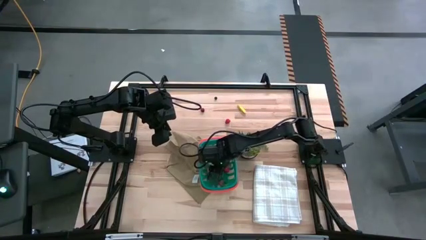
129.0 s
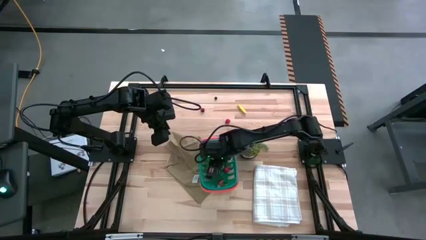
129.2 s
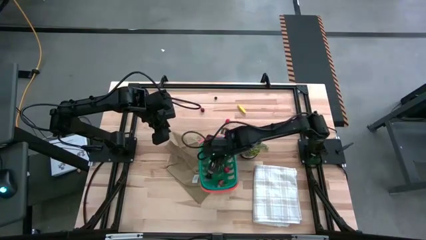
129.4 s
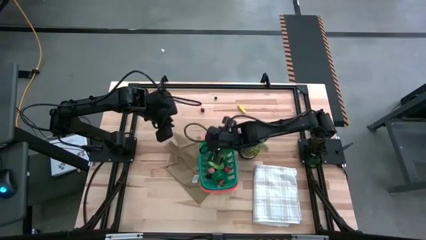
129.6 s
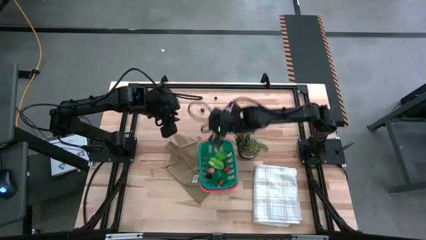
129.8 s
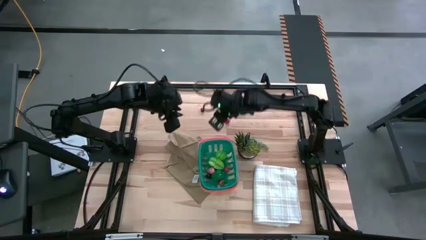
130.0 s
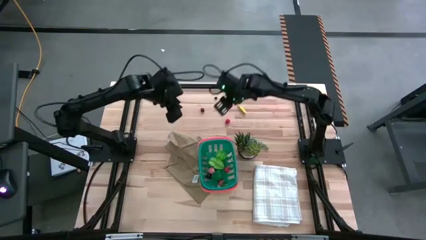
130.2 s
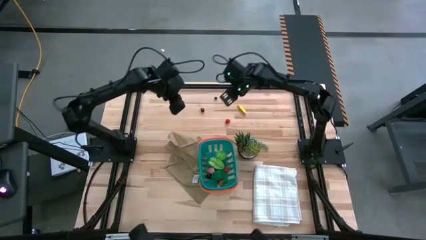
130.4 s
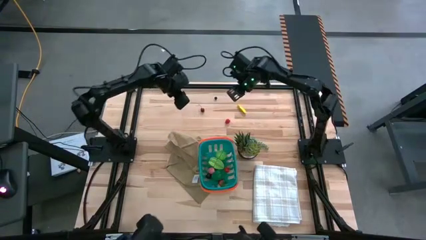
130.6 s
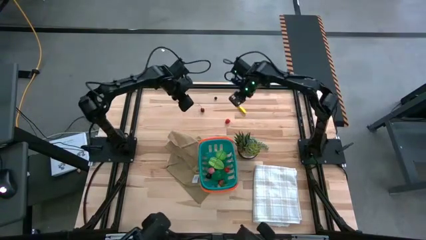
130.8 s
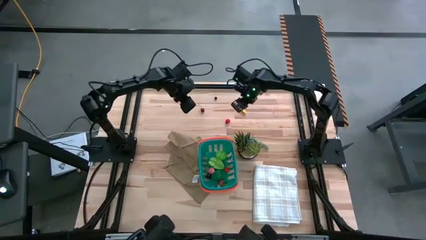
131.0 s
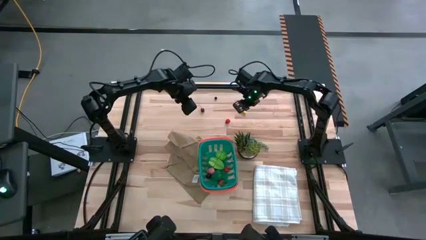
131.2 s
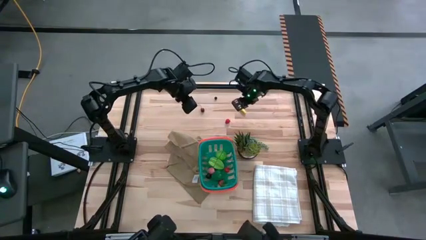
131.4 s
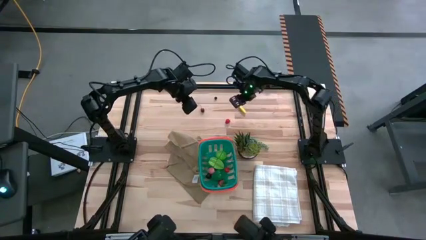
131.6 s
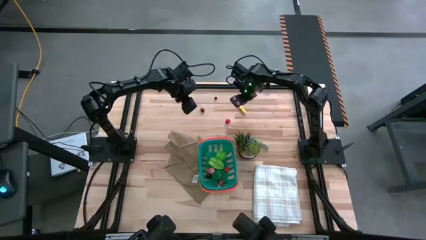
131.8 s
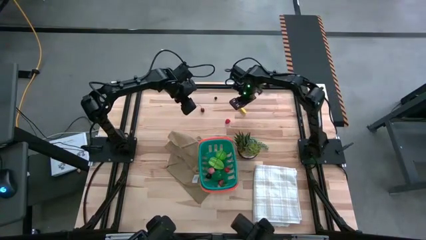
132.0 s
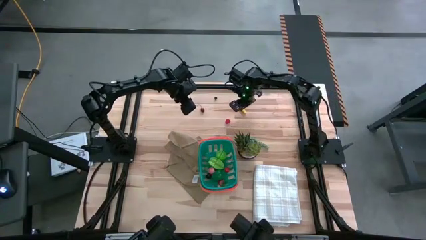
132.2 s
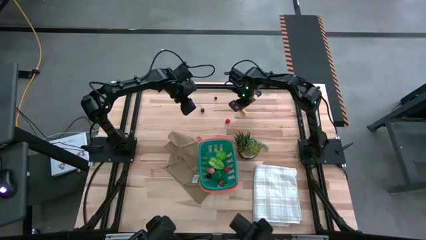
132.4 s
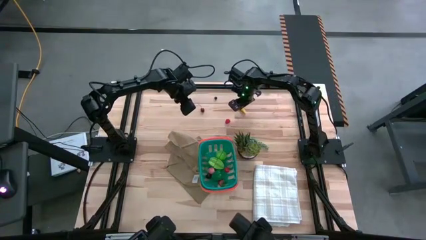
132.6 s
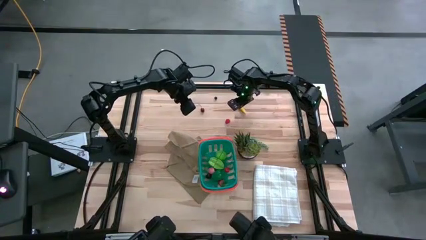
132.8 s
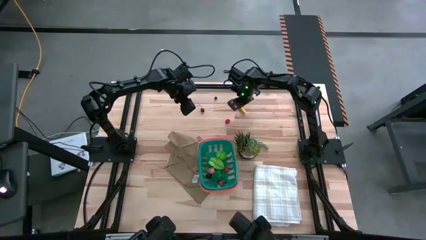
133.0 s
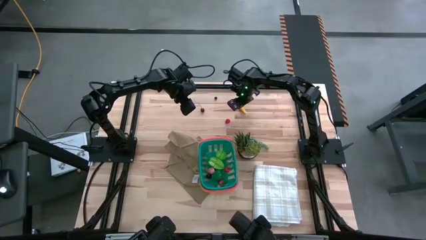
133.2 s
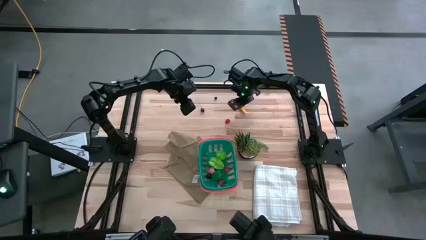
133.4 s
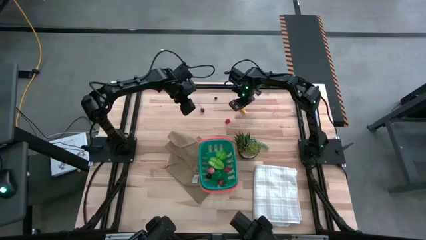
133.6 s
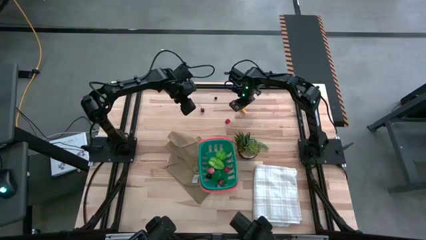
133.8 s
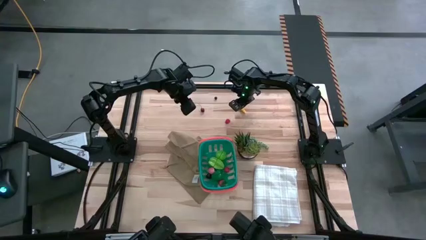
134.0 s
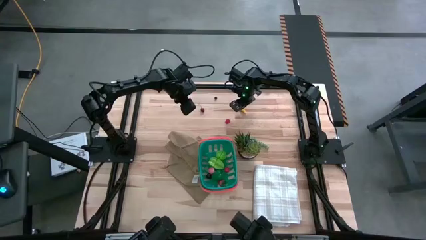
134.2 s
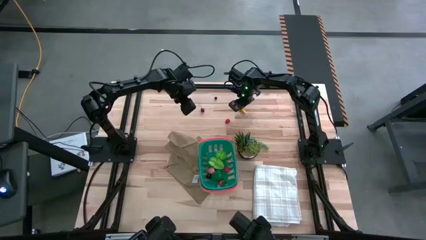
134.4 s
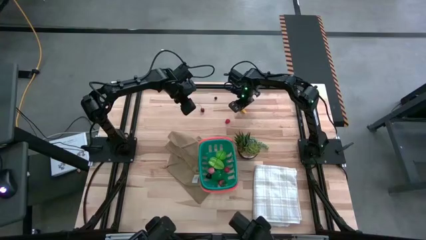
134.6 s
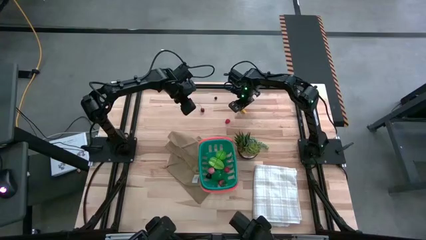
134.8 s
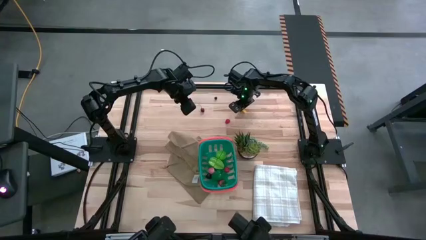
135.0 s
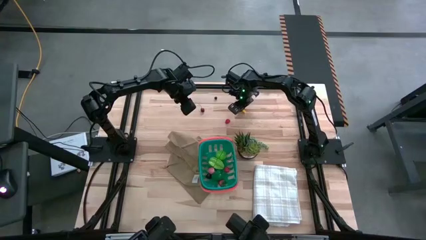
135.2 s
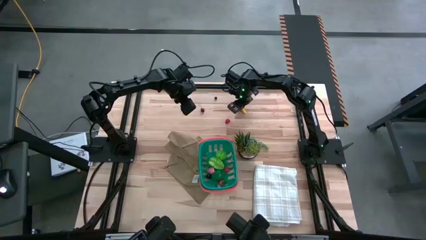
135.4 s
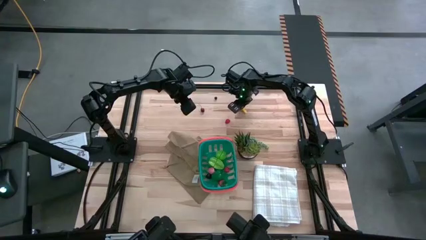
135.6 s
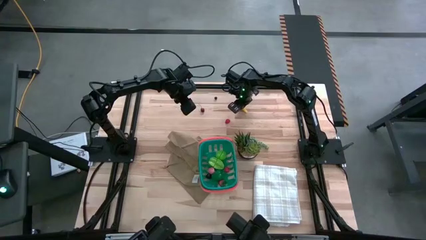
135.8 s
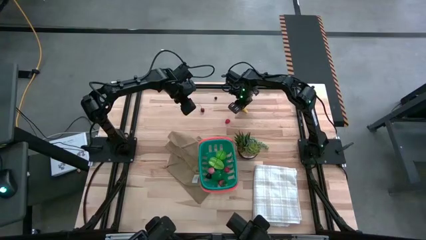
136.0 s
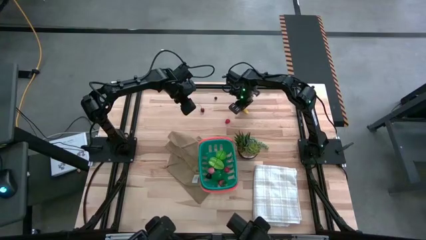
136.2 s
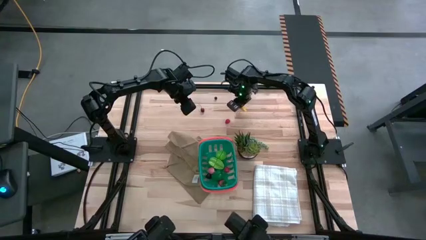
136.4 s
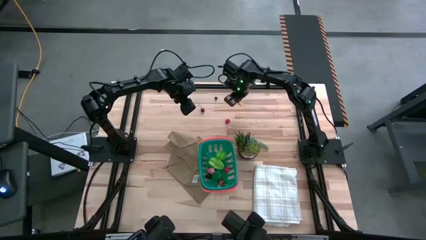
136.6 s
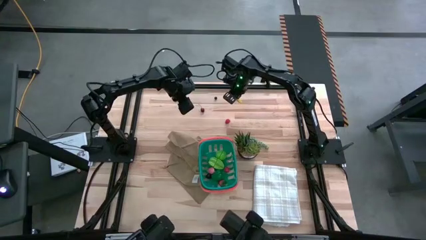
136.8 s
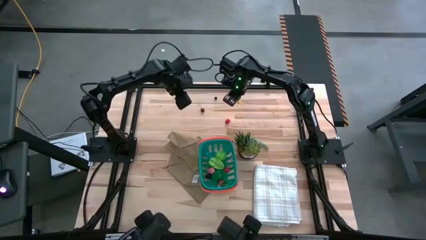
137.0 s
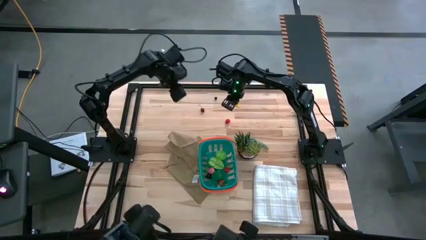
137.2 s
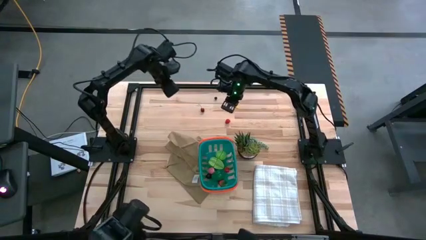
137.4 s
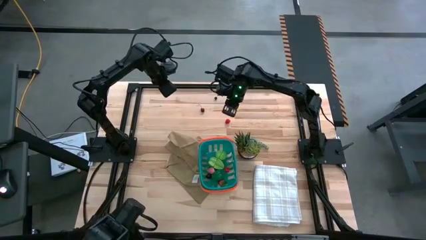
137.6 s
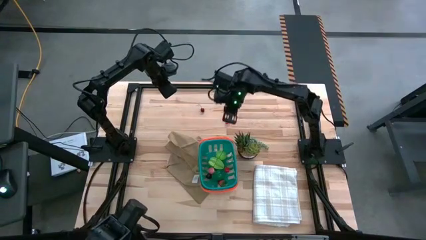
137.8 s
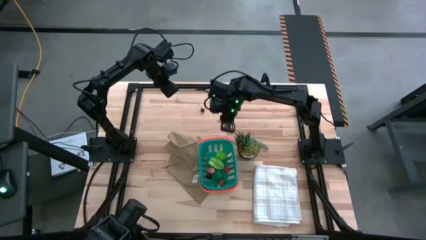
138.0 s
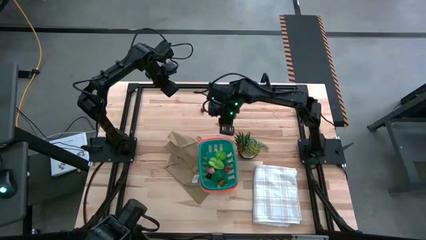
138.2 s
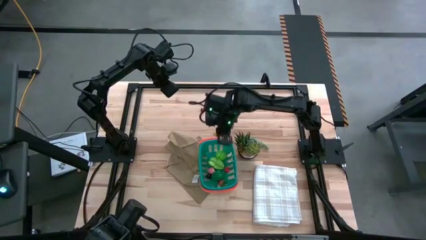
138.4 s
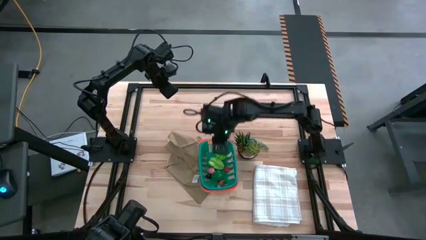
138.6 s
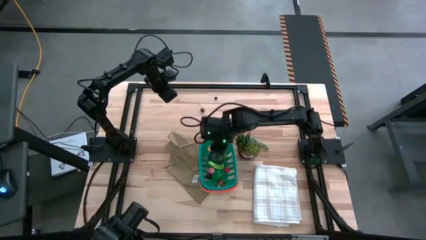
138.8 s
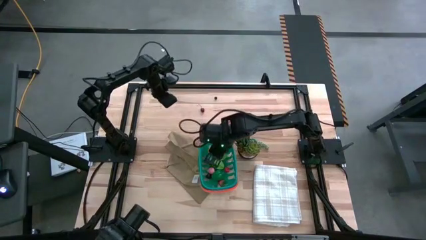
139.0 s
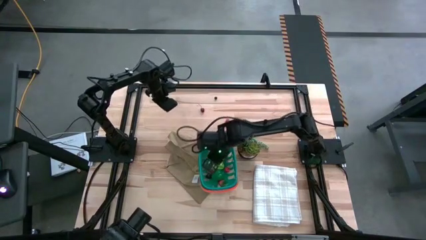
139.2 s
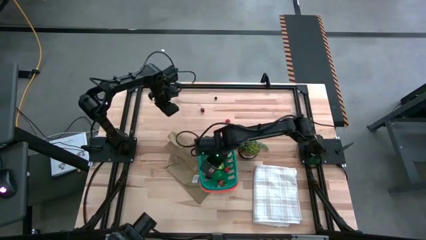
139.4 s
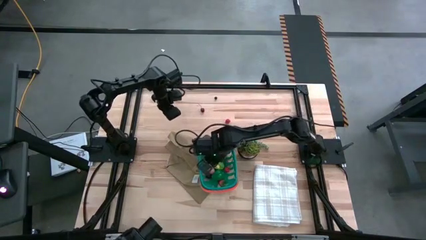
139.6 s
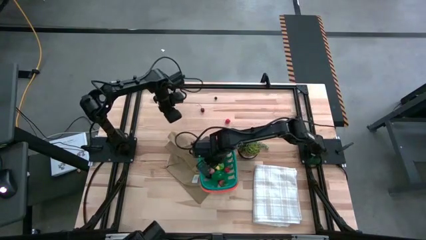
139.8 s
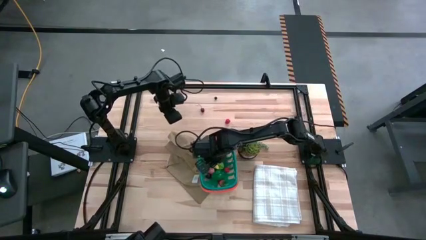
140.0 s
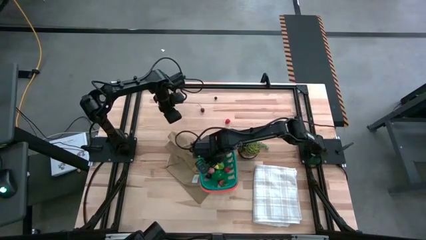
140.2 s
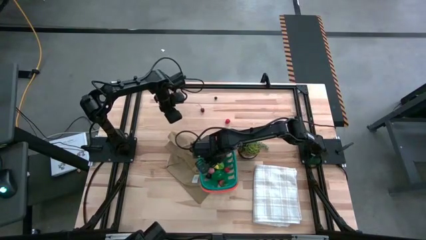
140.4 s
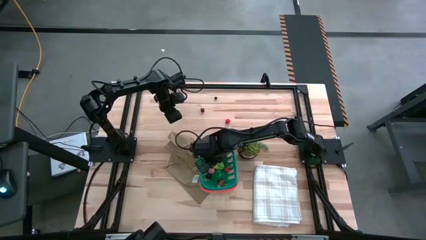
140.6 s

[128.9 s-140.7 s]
Task: Pick and placing Produce into tupperware
Put the yellow corn into the green basket
